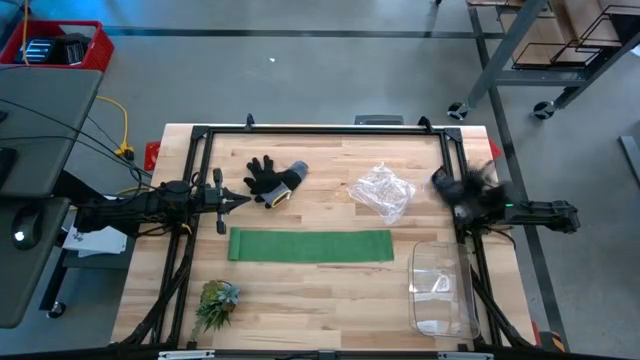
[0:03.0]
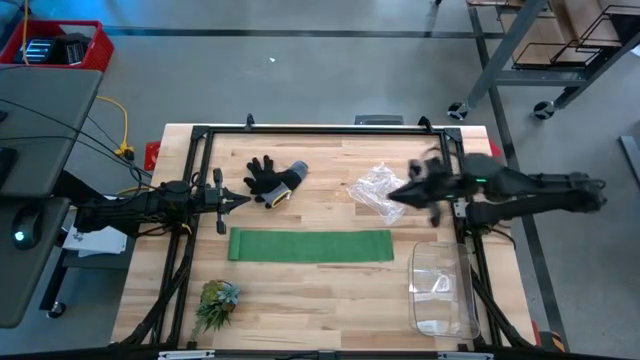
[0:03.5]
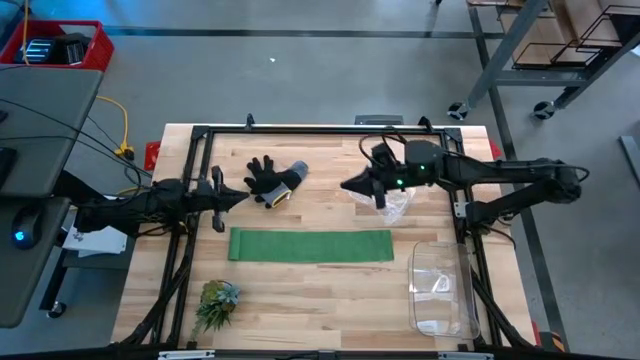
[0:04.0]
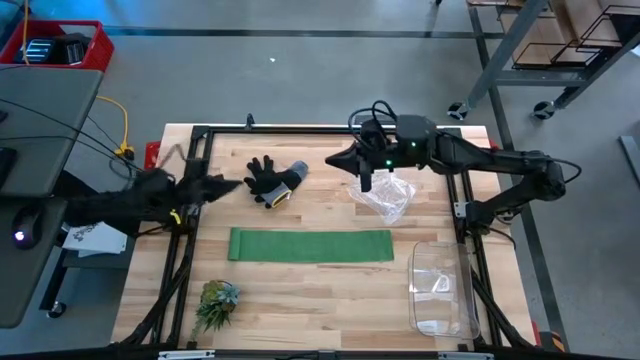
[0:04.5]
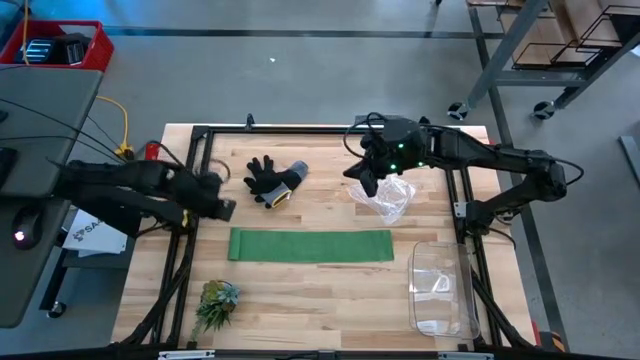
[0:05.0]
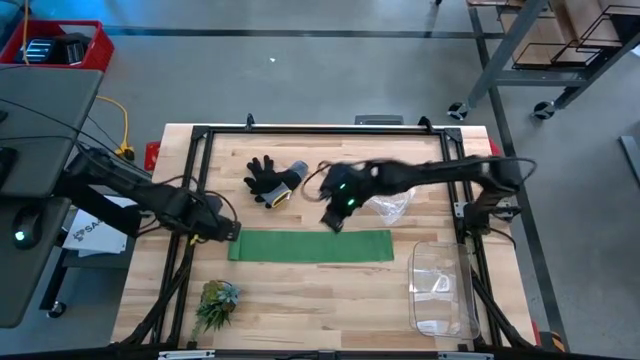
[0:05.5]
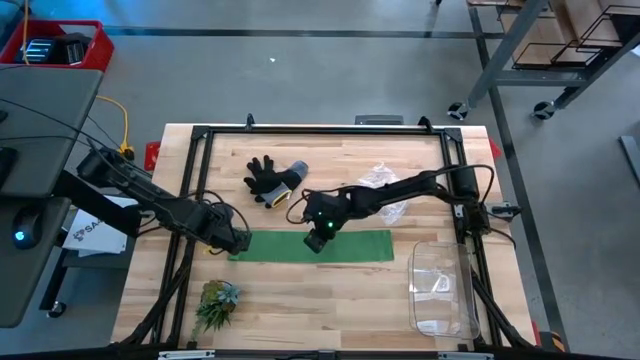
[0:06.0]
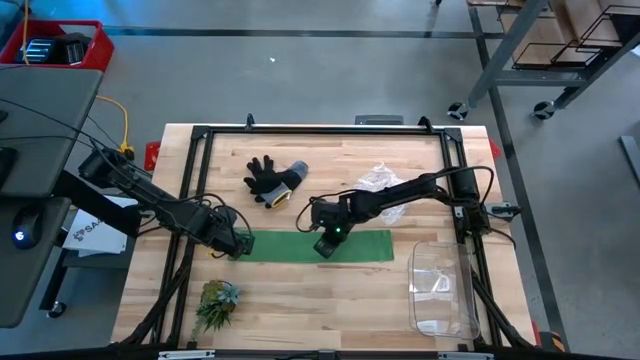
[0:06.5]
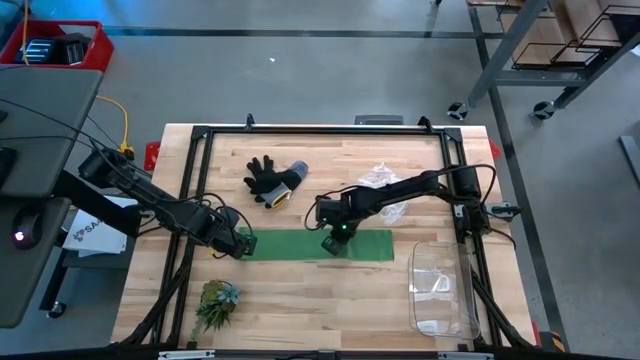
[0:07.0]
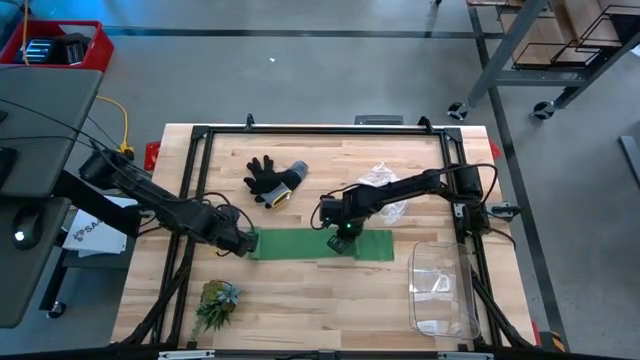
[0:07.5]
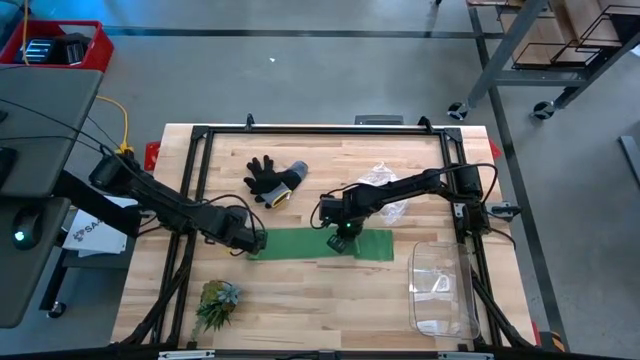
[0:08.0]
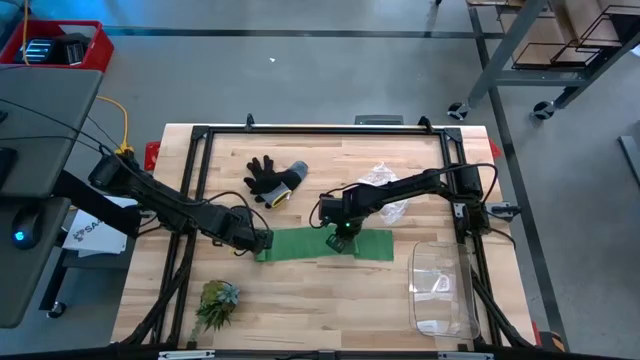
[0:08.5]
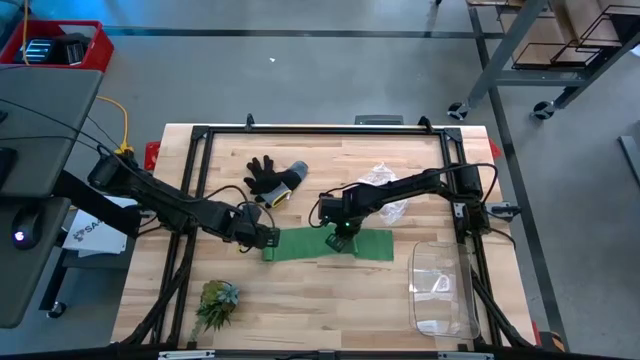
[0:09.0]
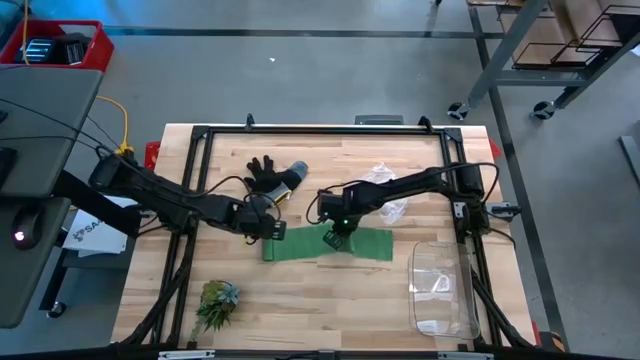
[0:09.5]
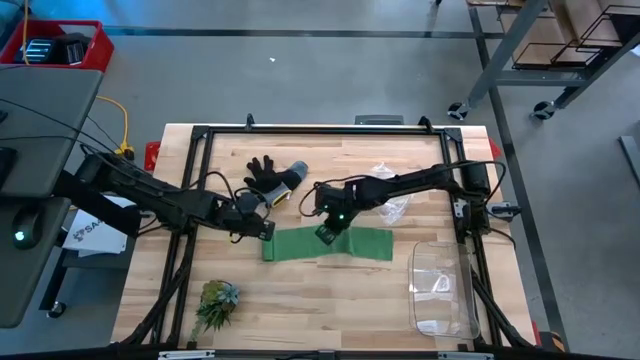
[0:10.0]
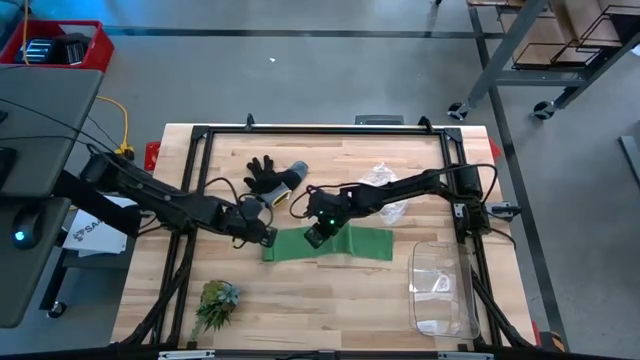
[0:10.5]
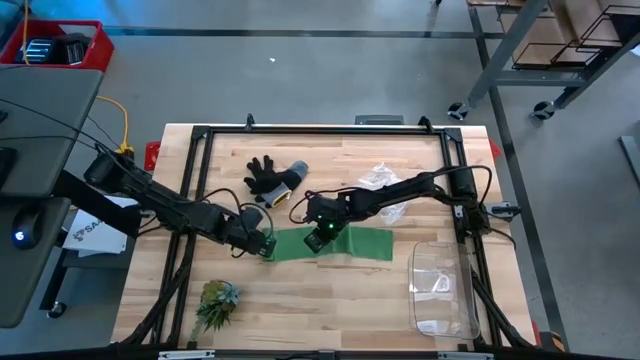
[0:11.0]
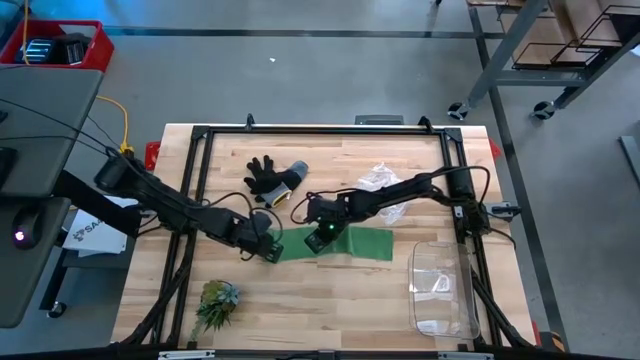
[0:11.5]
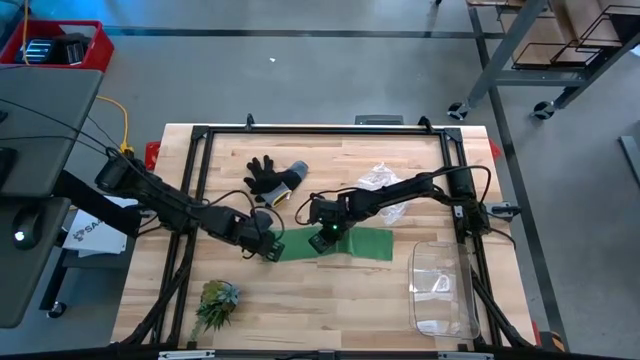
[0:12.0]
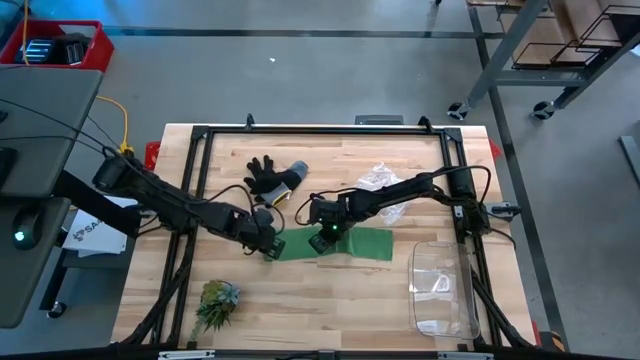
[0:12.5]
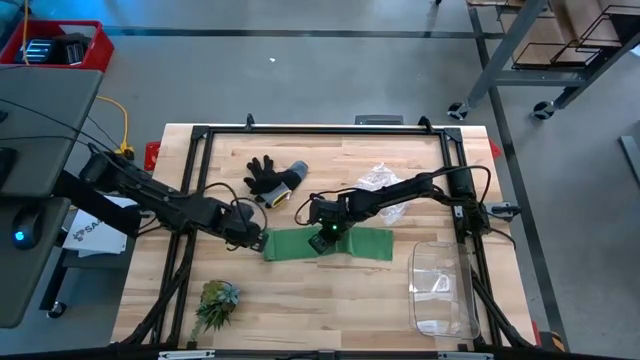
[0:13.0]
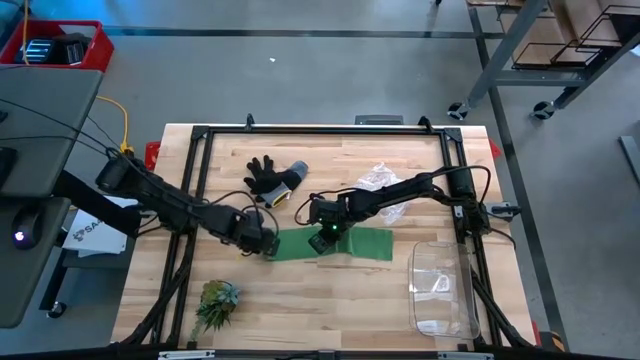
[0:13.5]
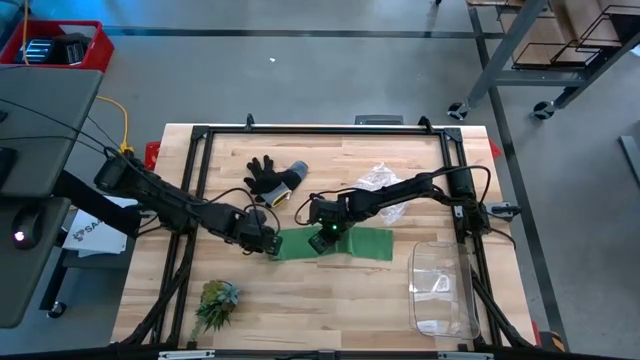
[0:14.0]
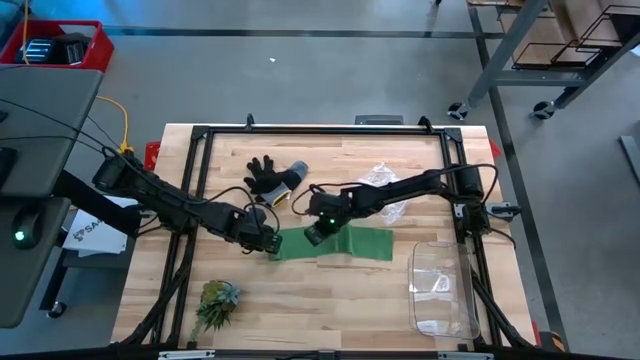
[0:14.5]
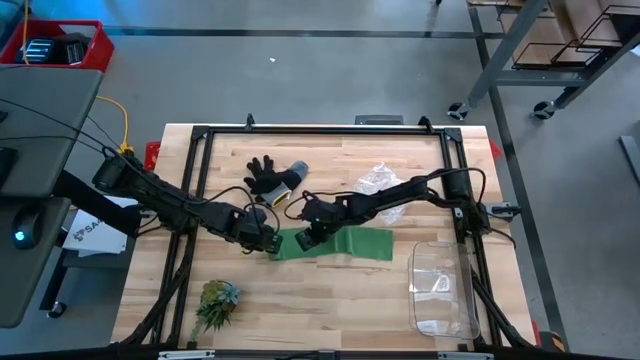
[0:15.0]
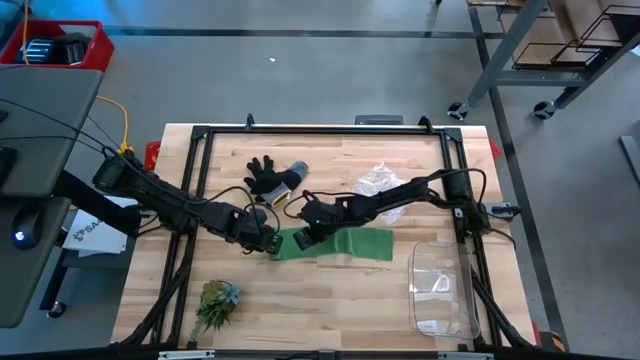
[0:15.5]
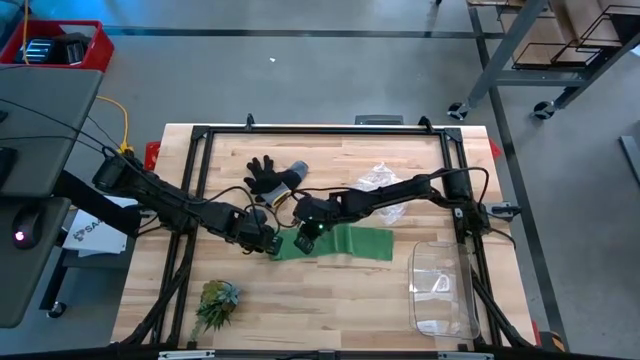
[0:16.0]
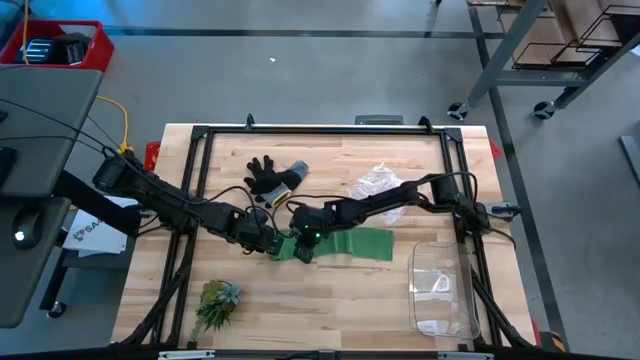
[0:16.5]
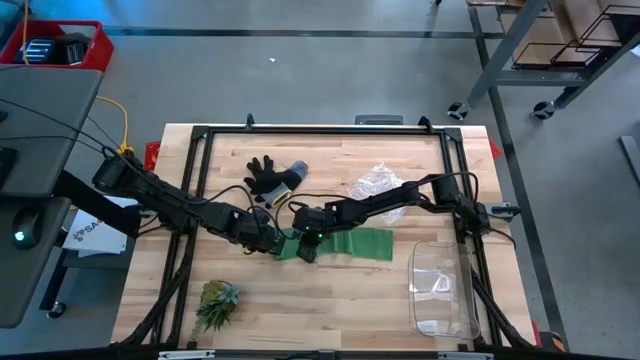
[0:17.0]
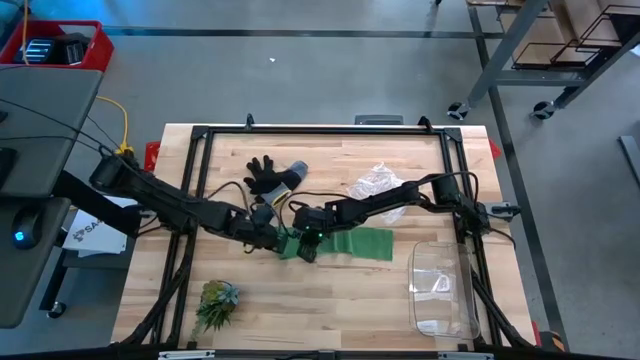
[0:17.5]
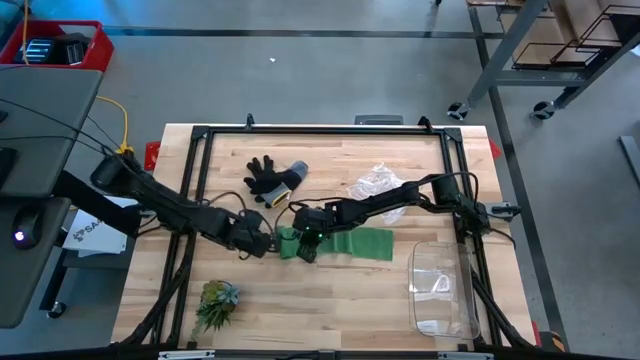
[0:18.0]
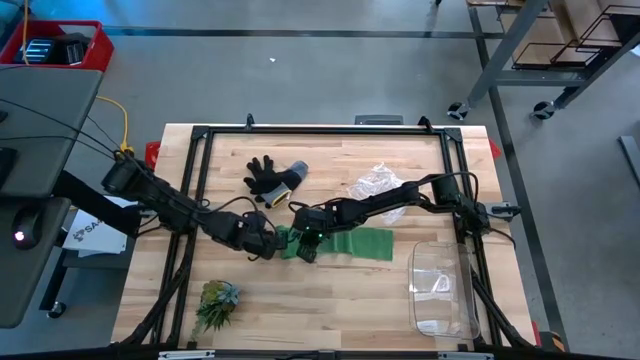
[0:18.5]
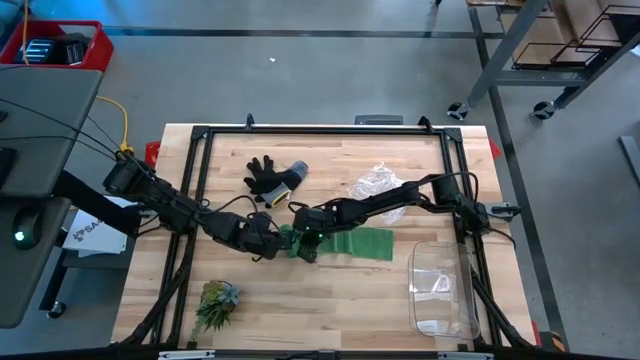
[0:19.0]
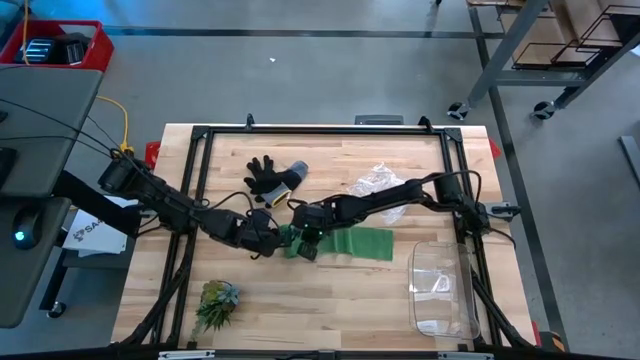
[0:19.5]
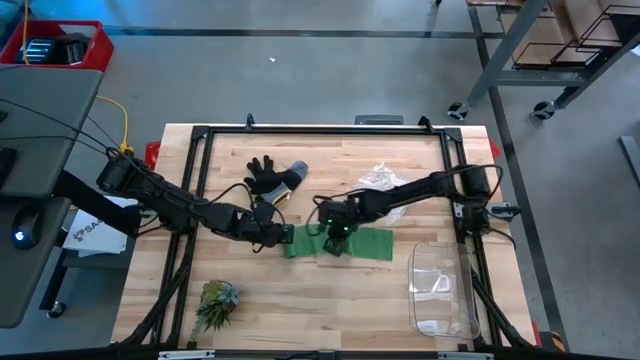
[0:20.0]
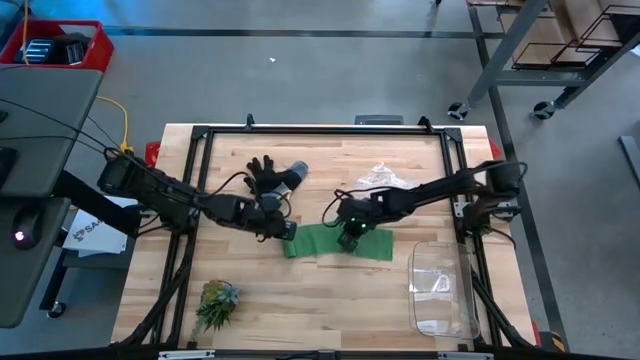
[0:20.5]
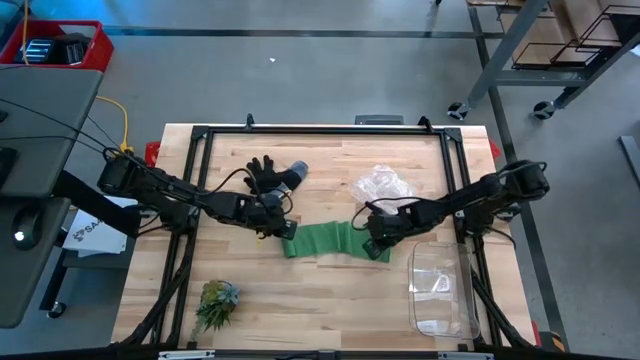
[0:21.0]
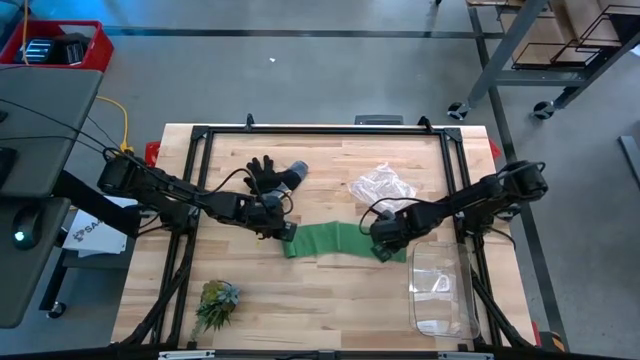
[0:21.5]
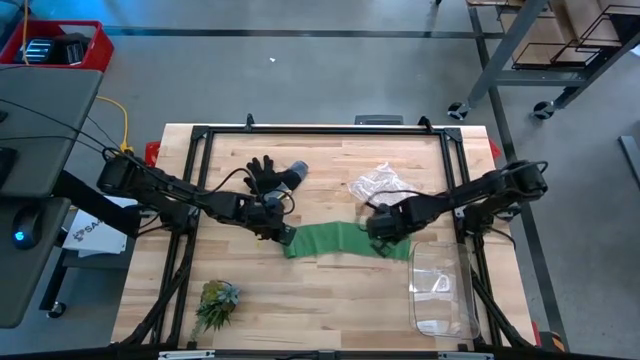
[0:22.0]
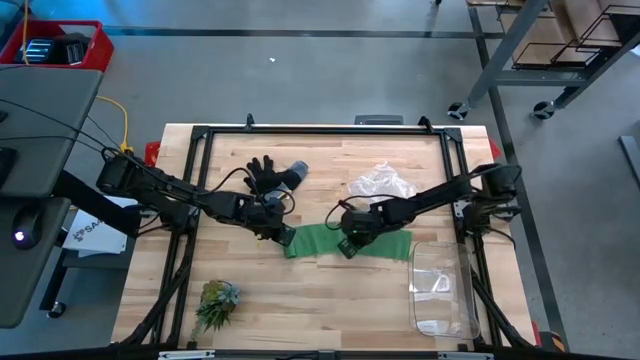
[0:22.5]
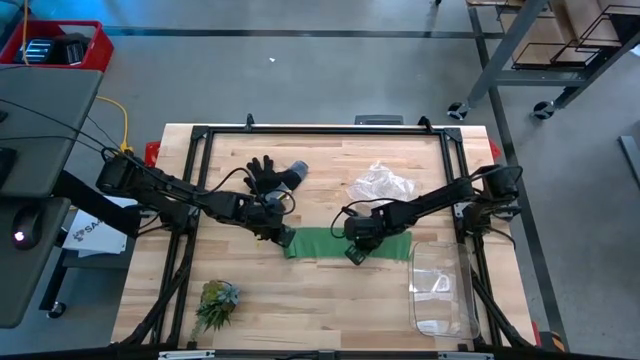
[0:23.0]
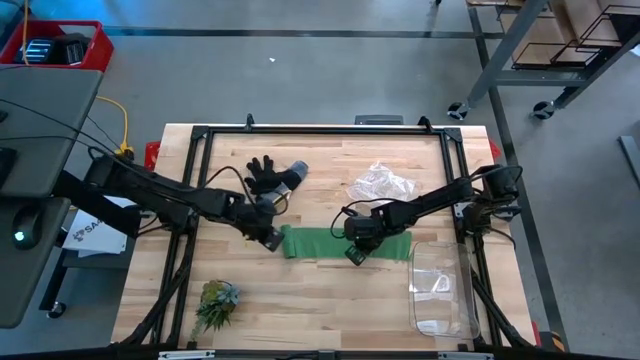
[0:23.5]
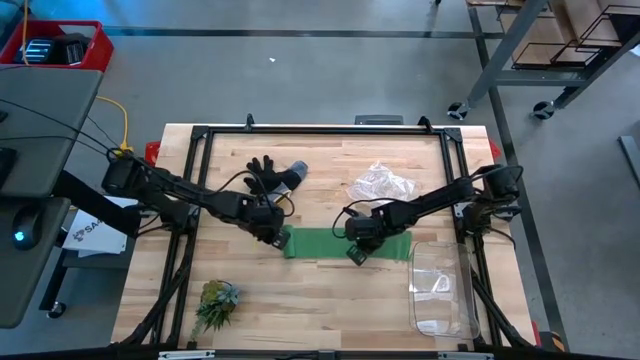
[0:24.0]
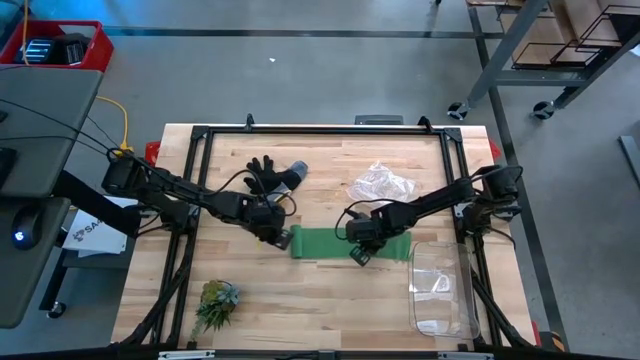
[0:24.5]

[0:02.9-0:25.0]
Task: Roll bandage
Roll the green bandage
